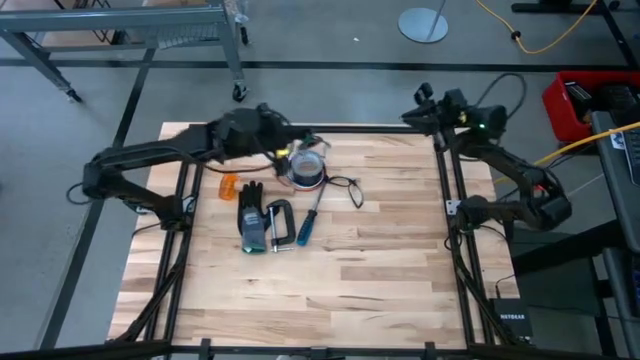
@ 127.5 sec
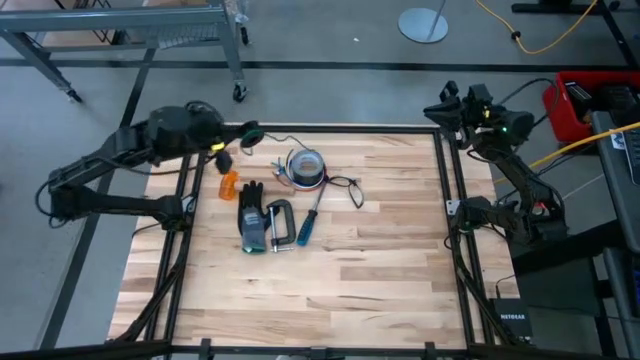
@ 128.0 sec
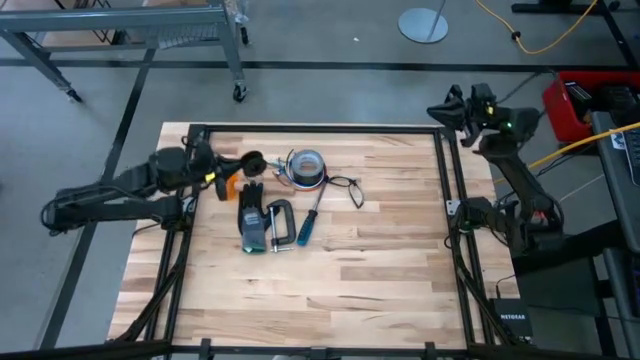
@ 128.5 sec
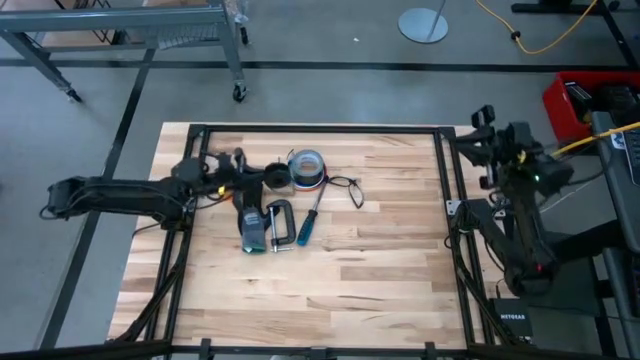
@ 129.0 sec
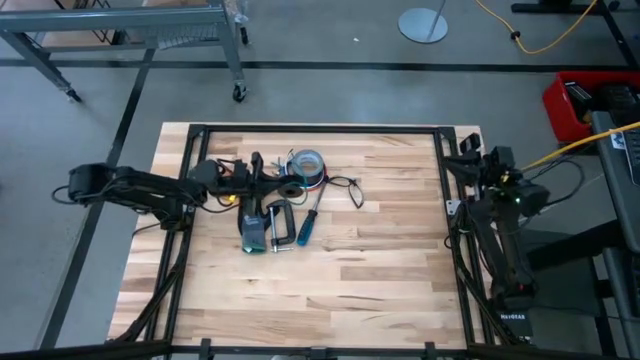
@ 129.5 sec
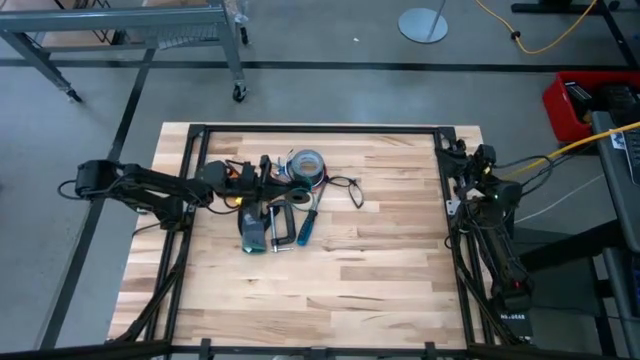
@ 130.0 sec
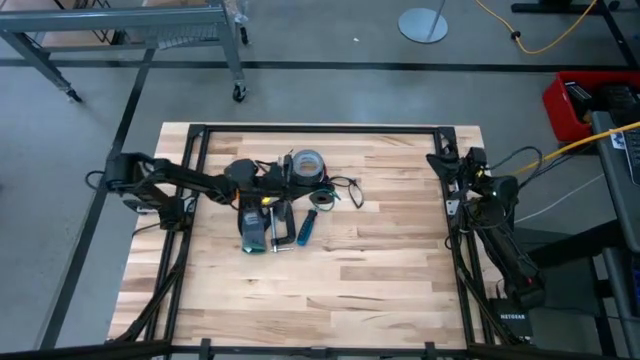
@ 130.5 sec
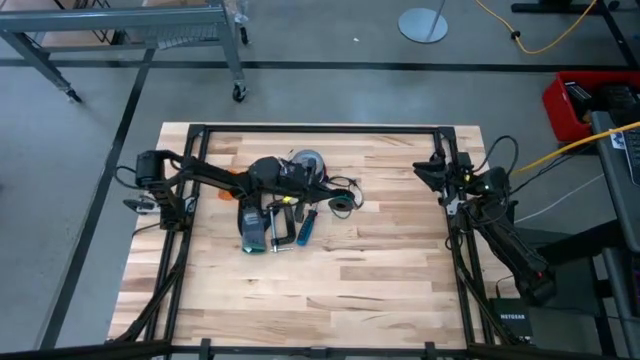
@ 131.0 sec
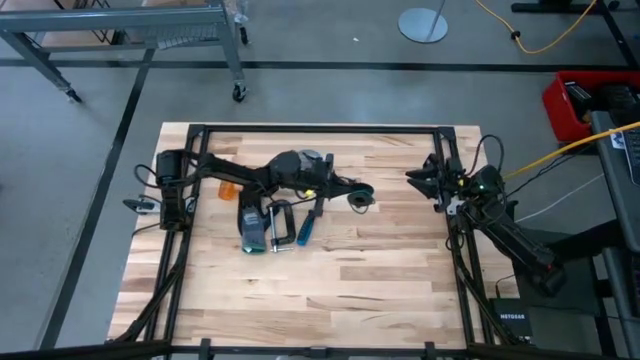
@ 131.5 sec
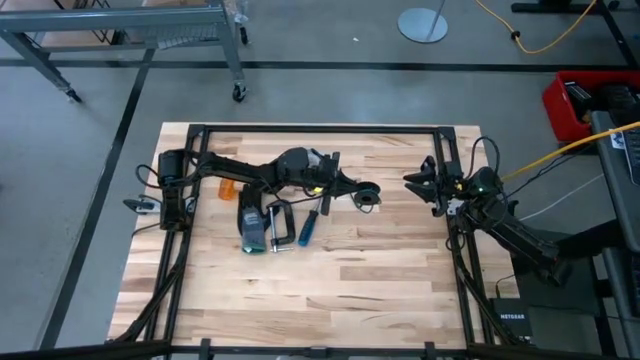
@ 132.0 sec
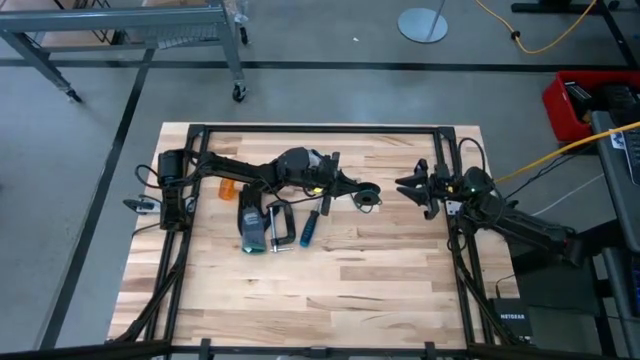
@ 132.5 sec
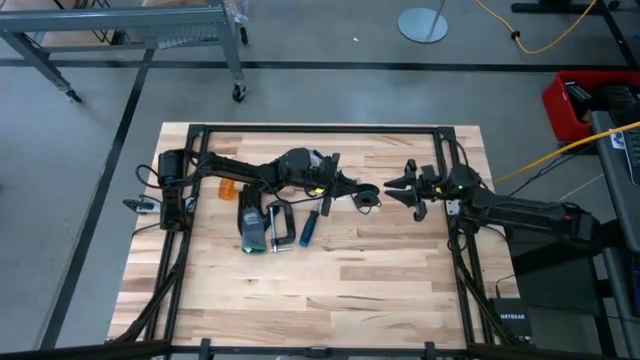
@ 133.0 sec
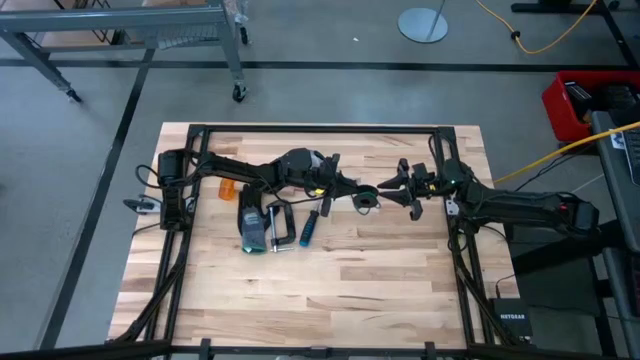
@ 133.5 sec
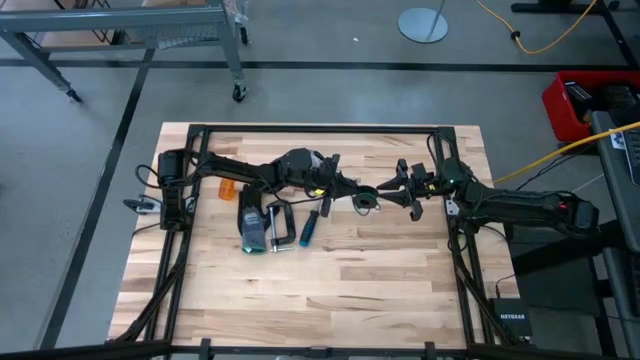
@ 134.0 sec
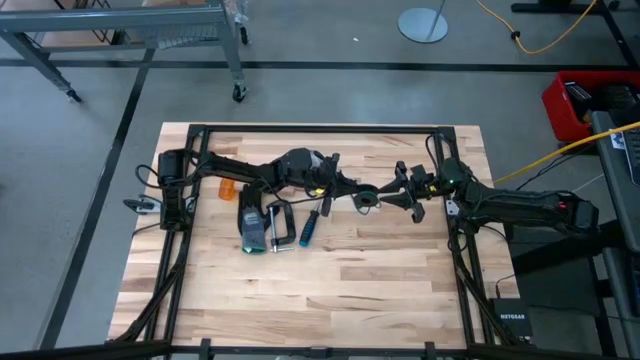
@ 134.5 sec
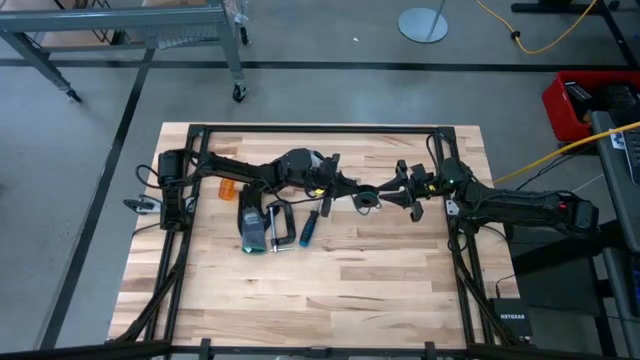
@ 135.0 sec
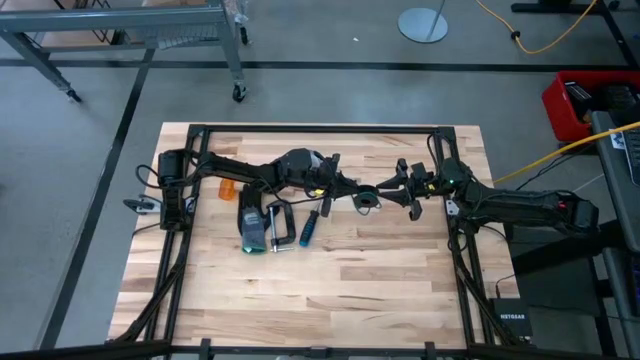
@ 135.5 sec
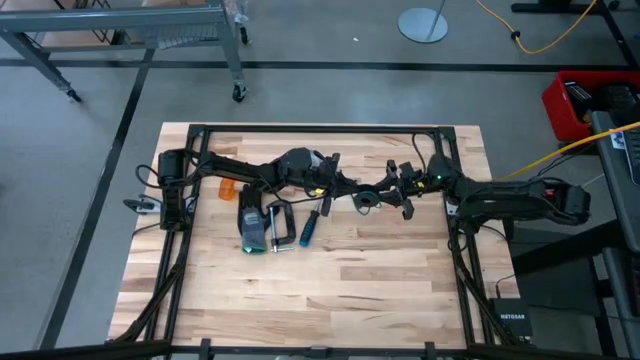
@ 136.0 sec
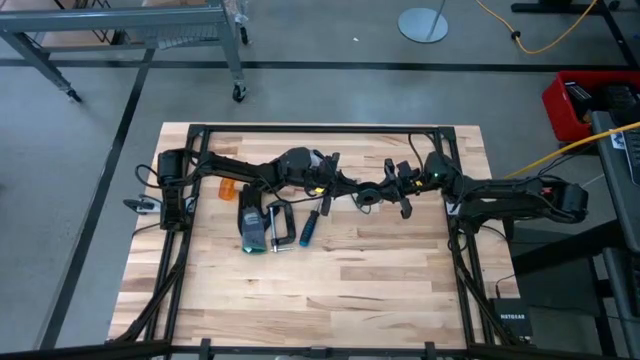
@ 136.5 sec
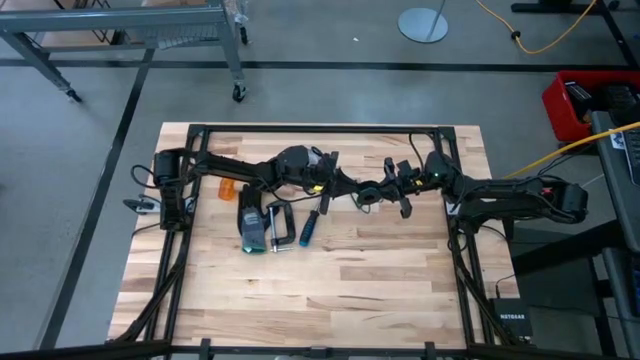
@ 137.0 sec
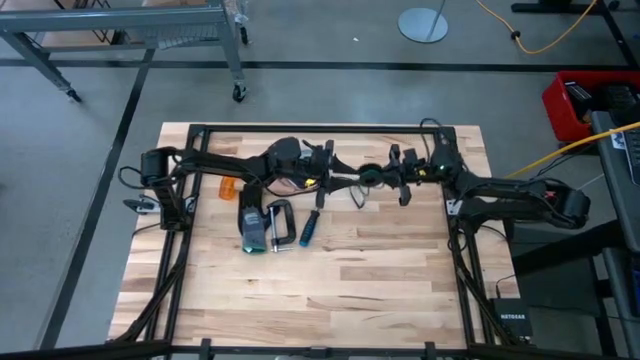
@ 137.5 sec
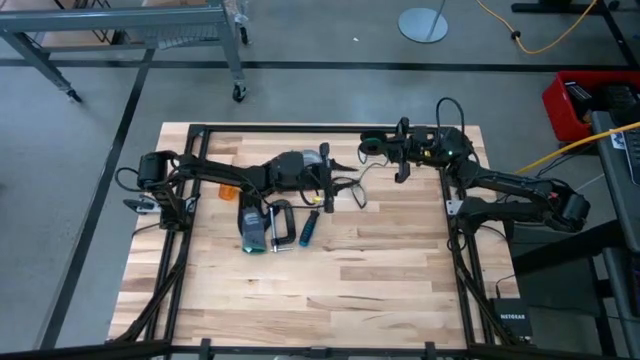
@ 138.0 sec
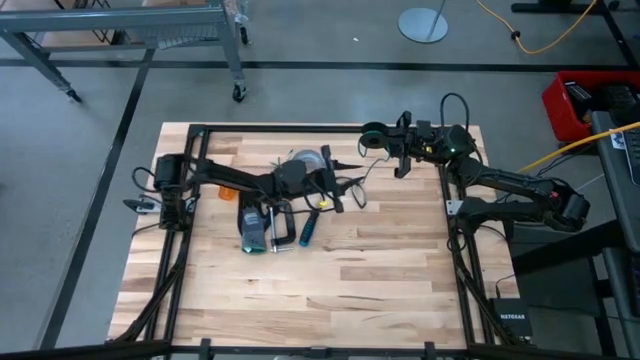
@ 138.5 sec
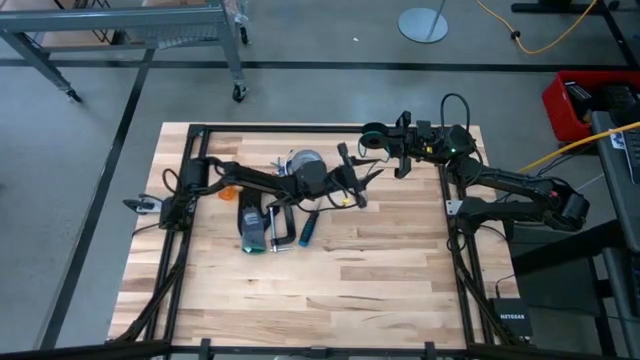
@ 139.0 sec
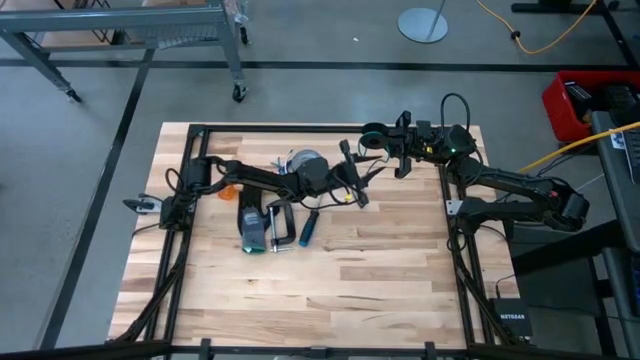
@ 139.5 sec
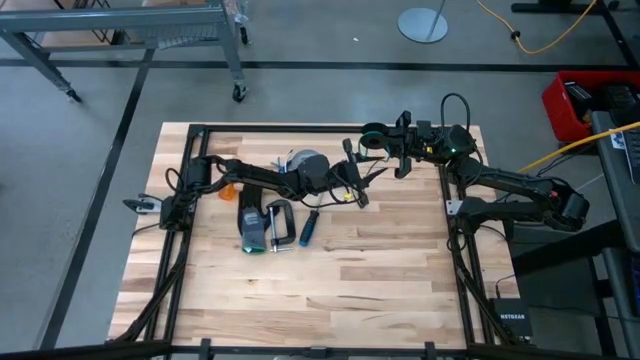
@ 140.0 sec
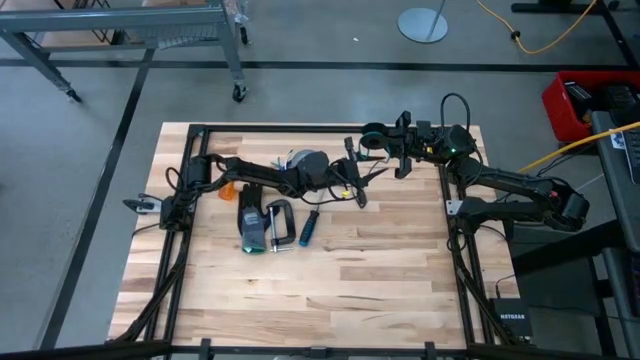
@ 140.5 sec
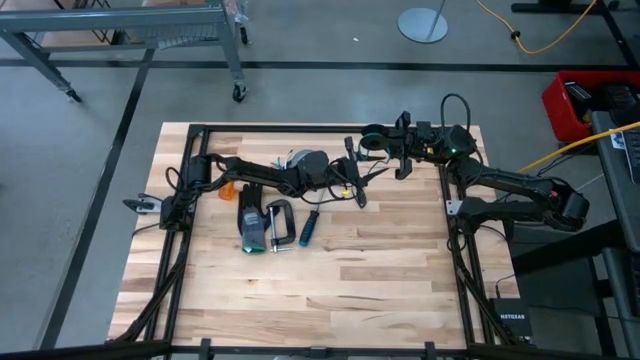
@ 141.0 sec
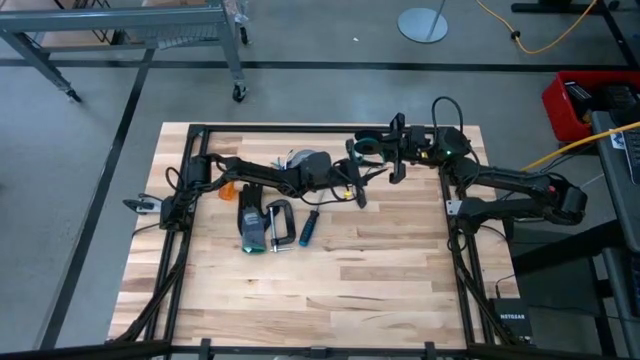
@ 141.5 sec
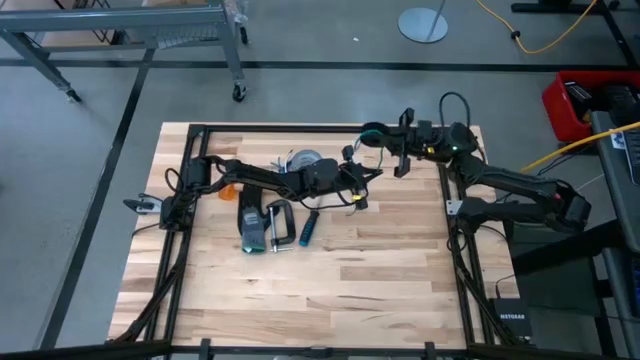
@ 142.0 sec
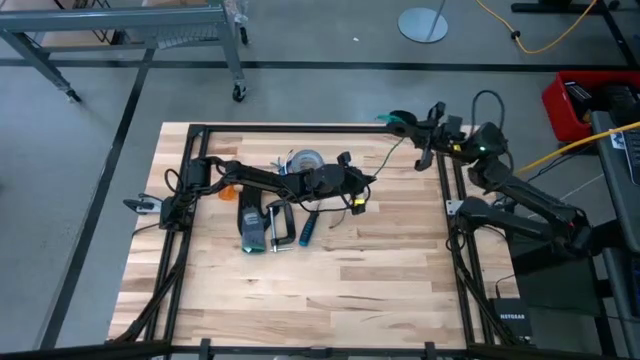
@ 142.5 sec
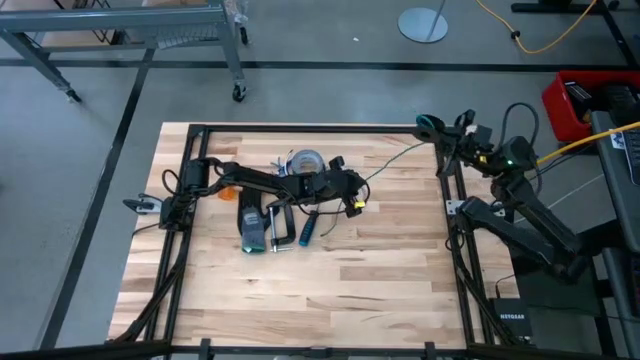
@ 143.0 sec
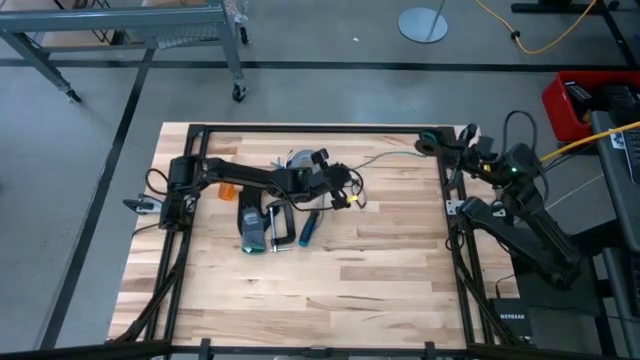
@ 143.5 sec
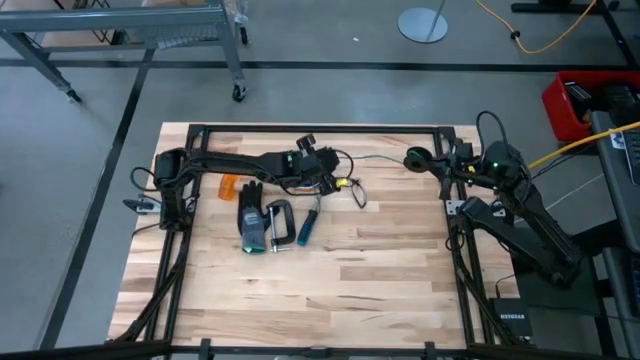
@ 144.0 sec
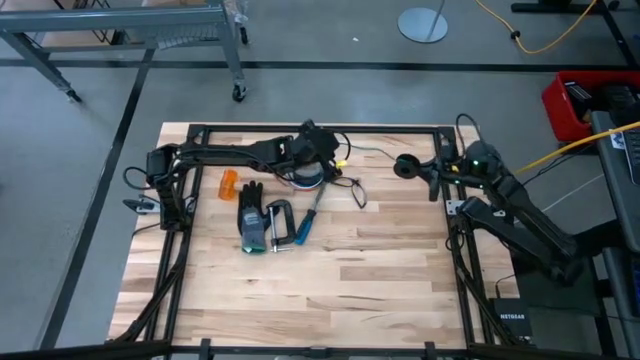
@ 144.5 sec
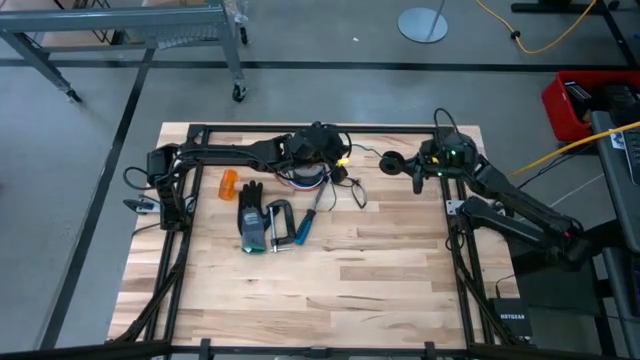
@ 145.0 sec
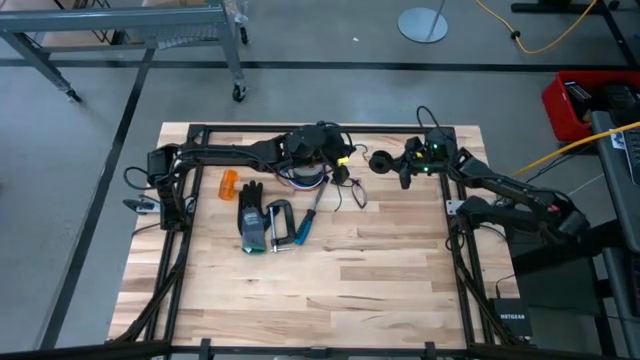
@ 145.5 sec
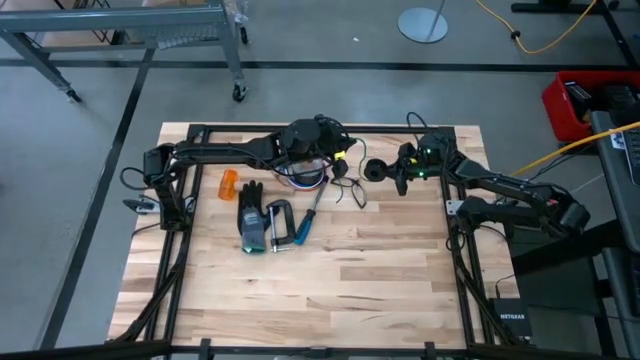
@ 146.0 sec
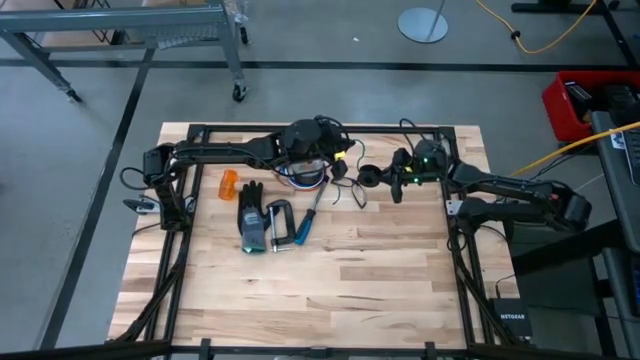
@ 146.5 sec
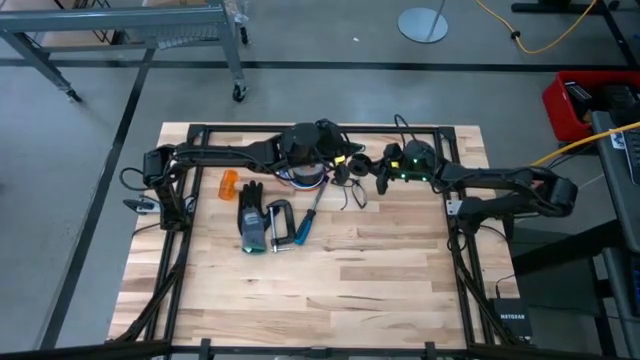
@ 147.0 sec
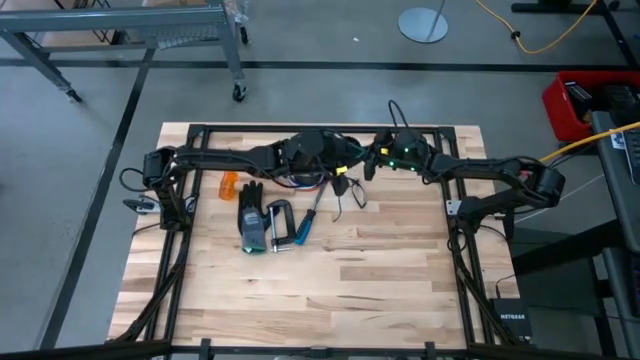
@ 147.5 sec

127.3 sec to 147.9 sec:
Task: Coil cords
Coil the wire in the cable spool
